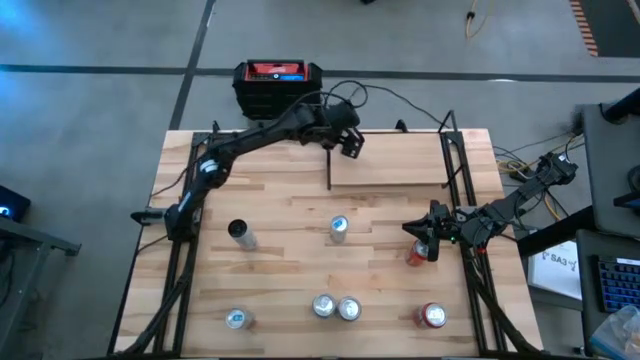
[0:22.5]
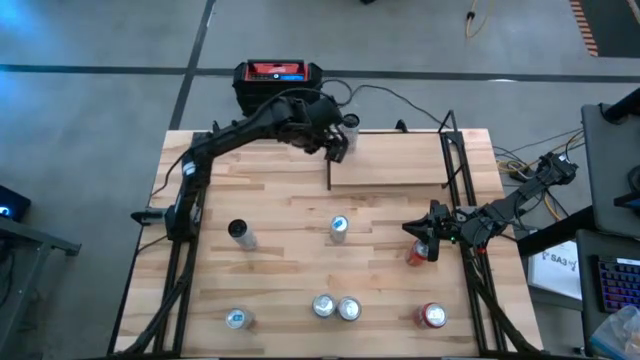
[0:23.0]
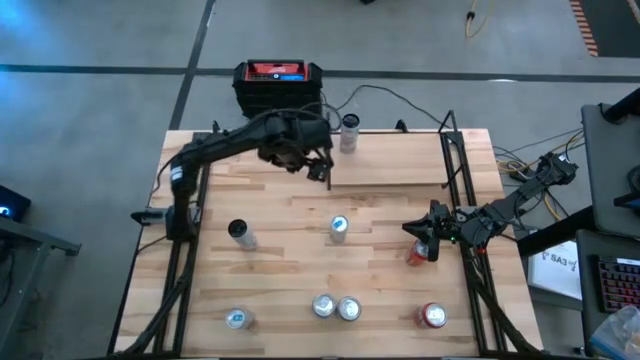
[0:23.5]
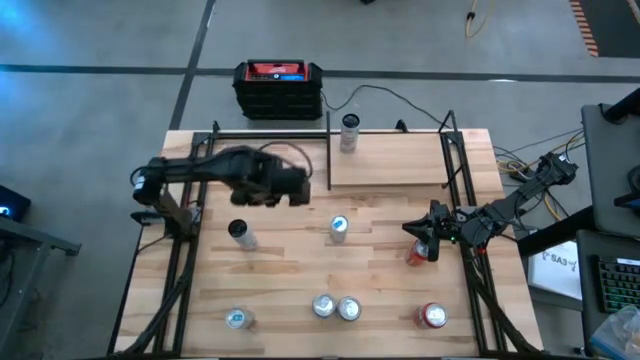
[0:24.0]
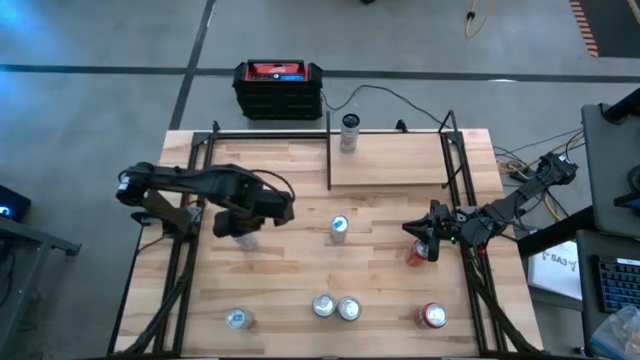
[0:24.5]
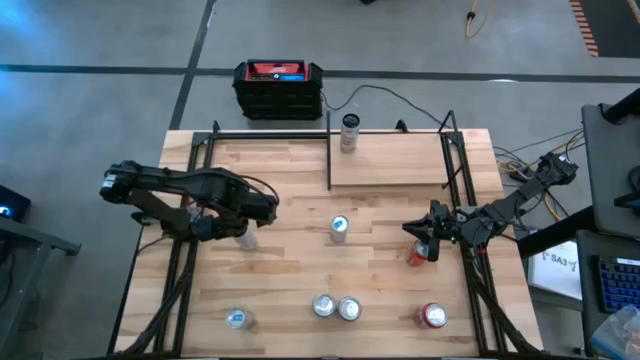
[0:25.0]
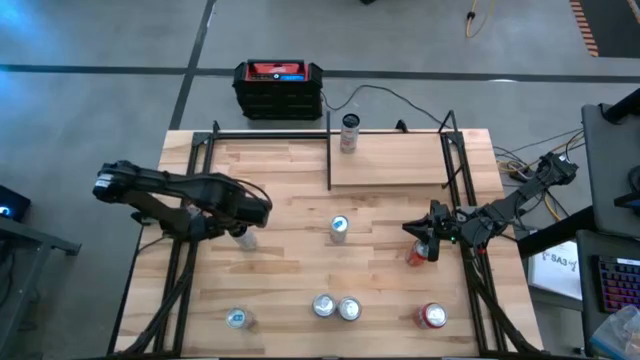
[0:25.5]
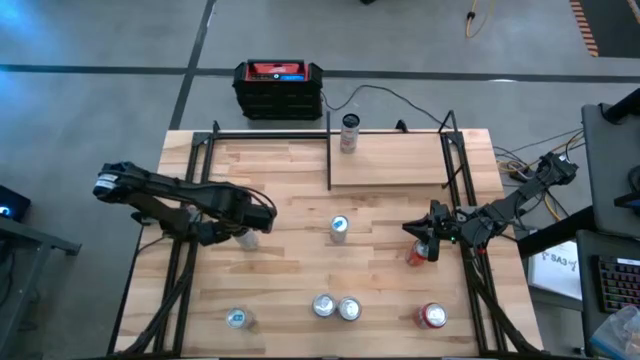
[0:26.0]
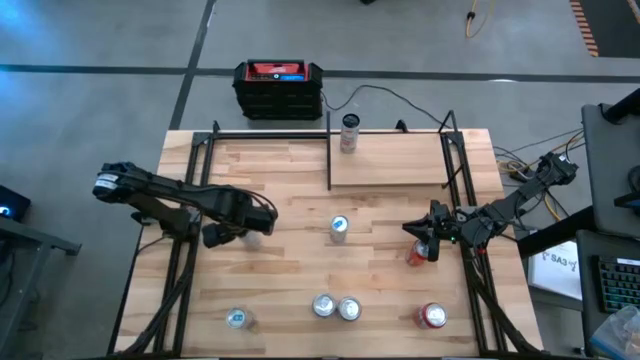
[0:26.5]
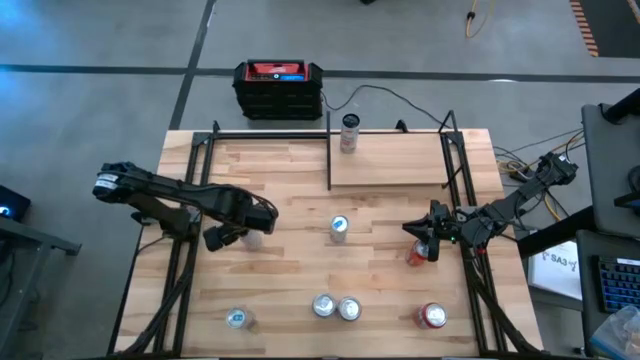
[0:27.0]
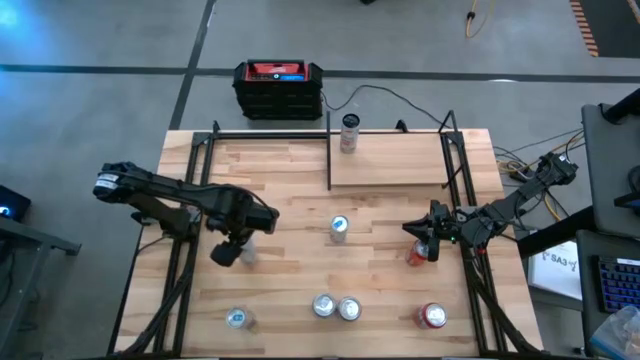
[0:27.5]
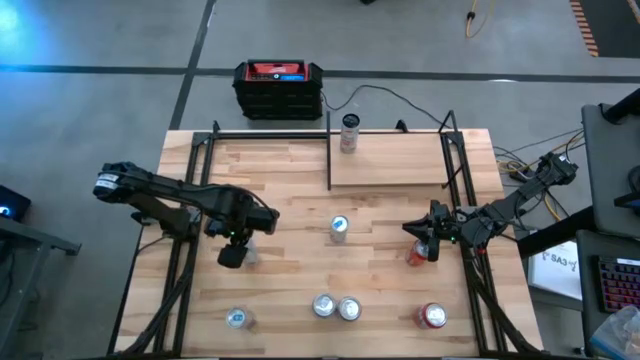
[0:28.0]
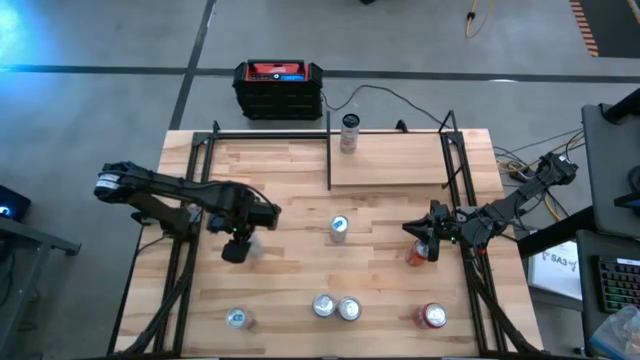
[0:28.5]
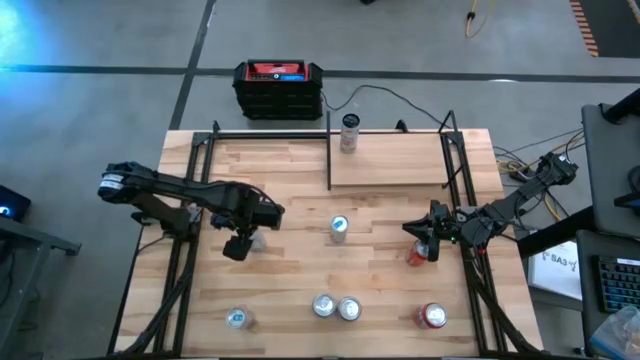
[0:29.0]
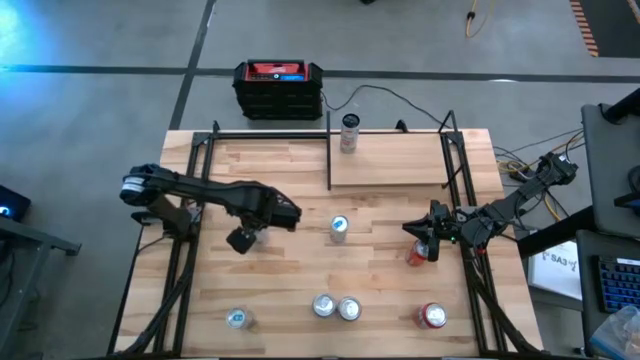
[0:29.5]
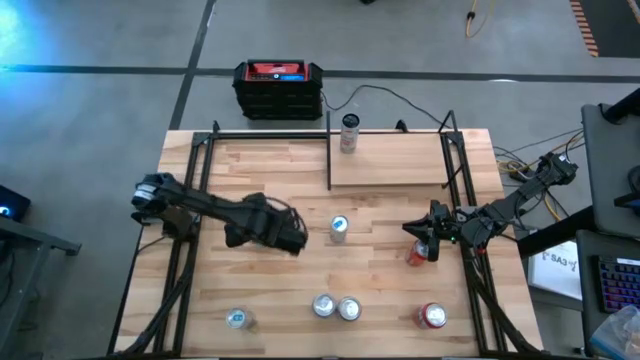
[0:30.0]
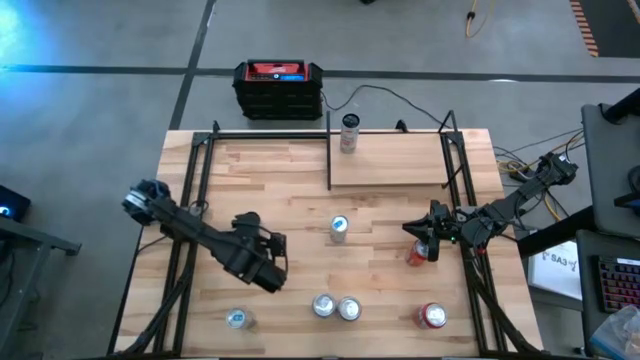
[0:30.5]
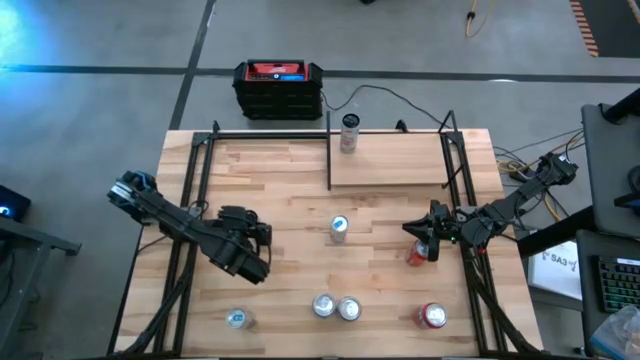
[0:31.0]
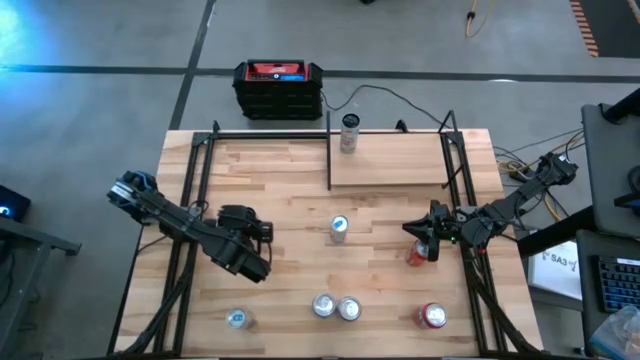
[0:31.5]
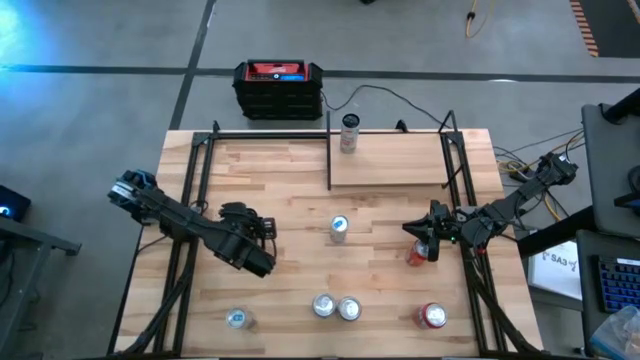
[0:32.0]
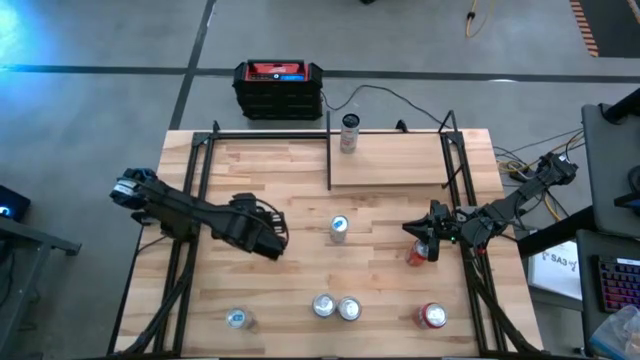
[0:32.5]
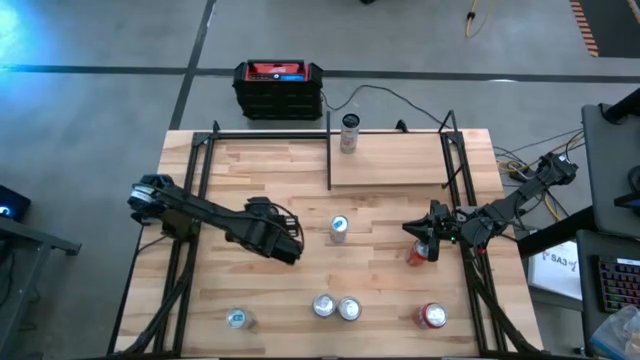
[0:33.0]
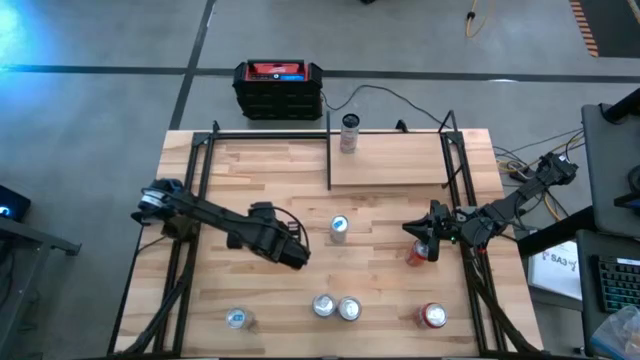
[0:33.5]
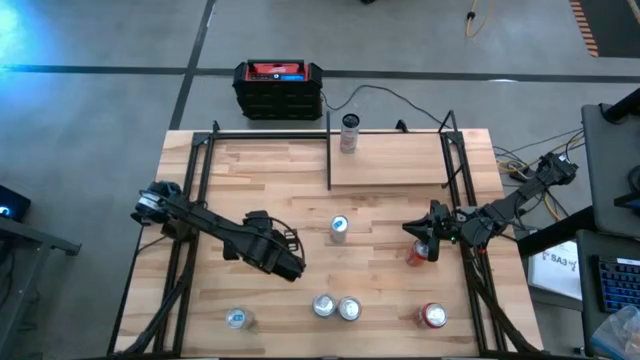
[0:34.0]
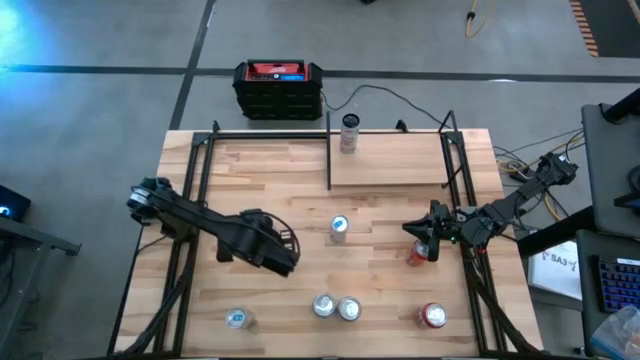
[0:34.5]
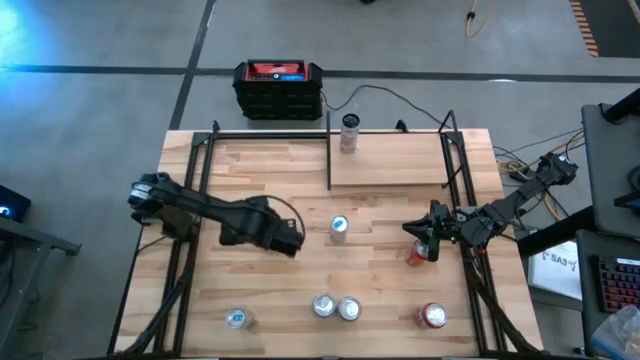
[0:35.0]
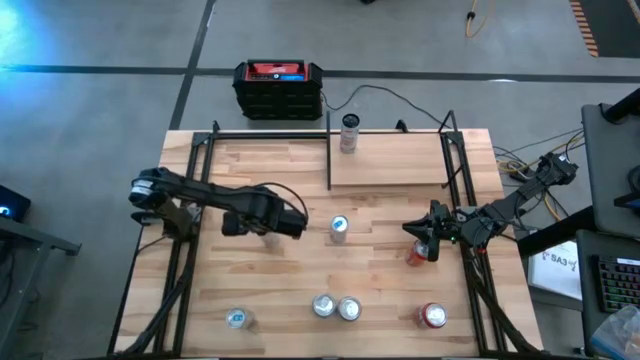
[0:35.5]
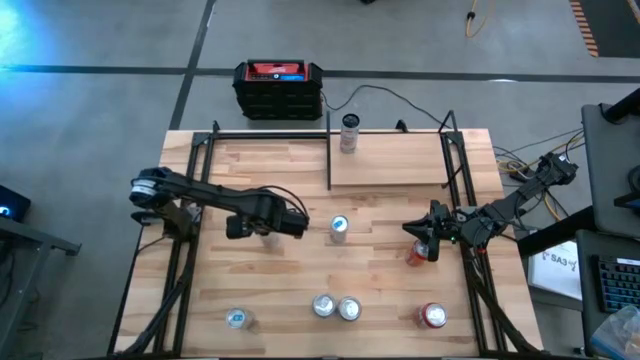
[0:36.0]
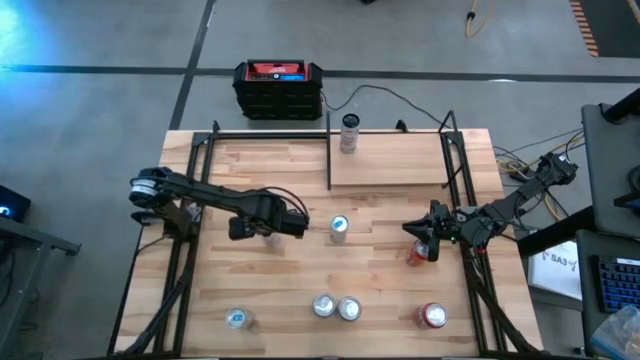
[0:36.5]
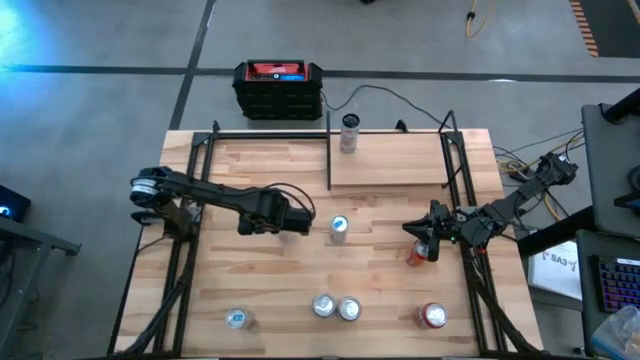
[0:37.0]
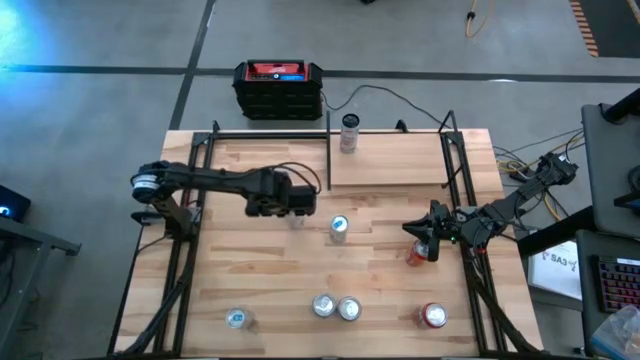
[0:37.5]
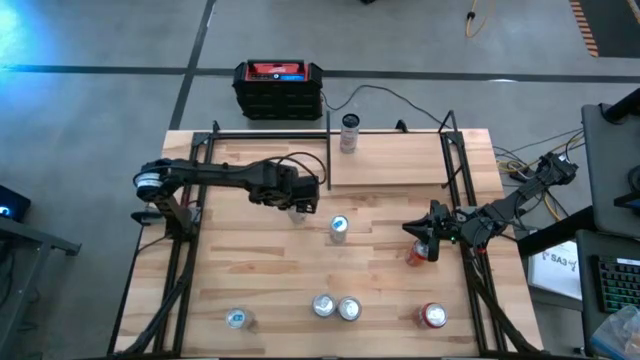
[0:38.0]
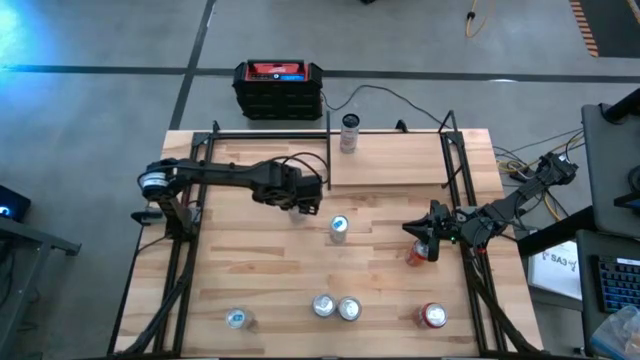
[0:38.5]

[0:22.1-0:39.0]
Task: Place canned beverage on shelf
Move the white pink soda to the center of the table

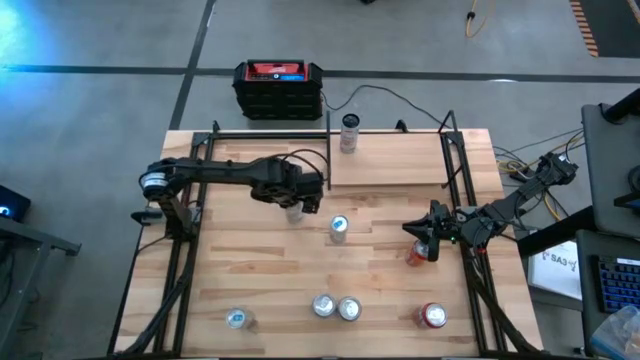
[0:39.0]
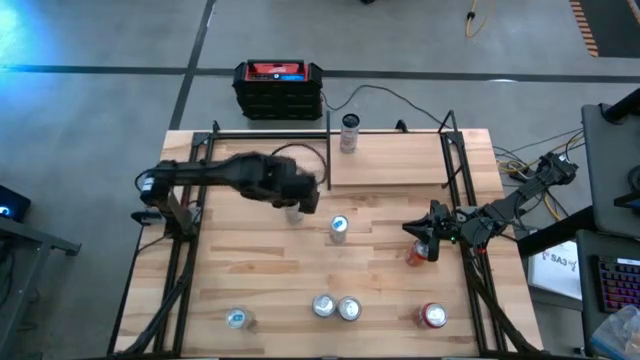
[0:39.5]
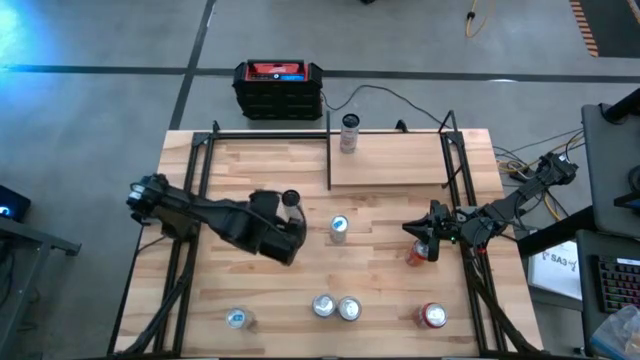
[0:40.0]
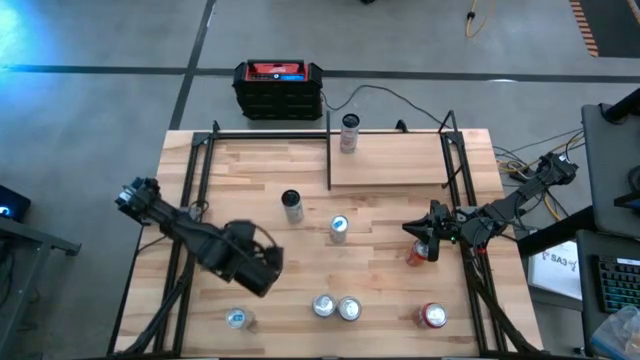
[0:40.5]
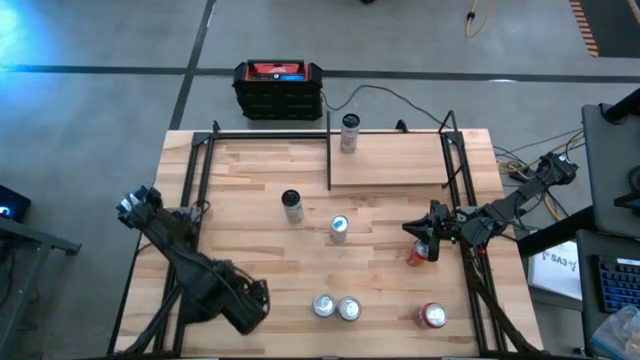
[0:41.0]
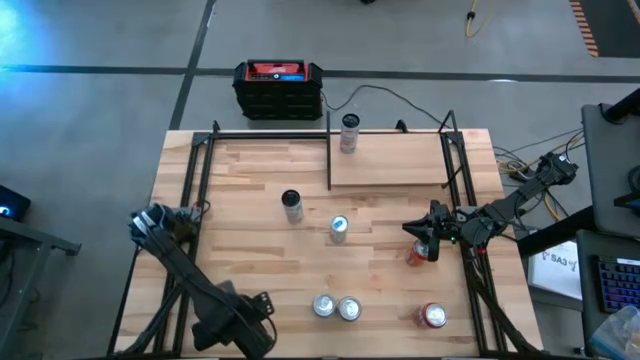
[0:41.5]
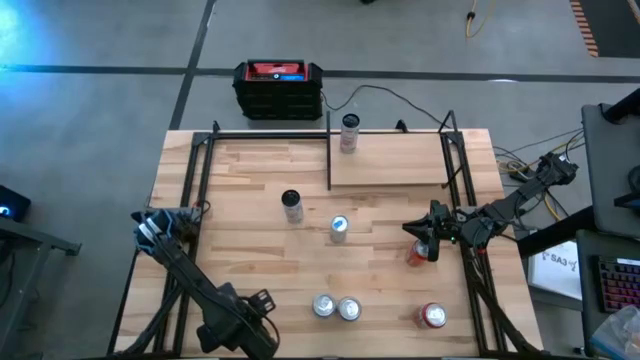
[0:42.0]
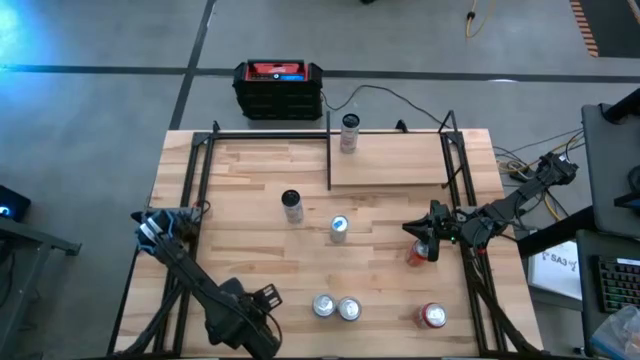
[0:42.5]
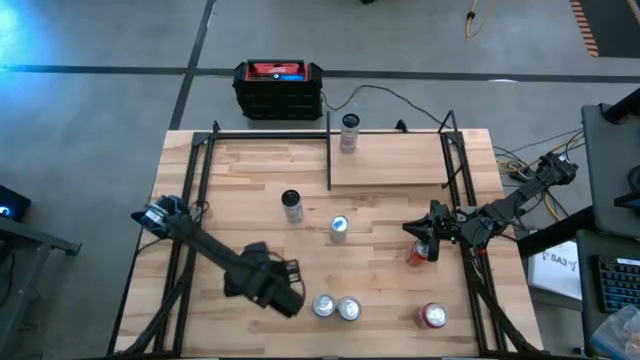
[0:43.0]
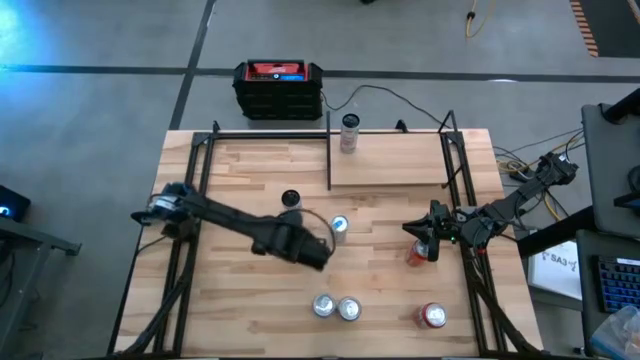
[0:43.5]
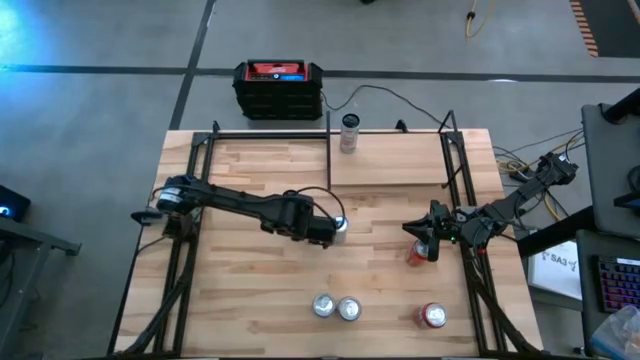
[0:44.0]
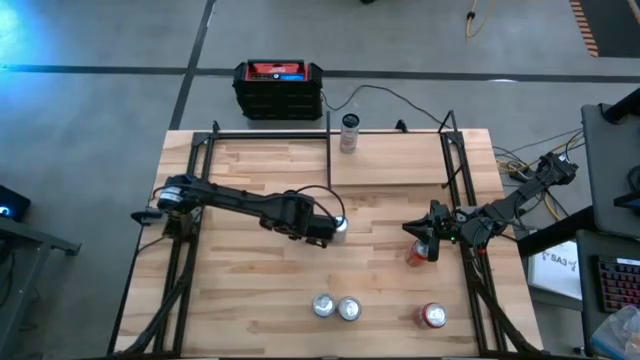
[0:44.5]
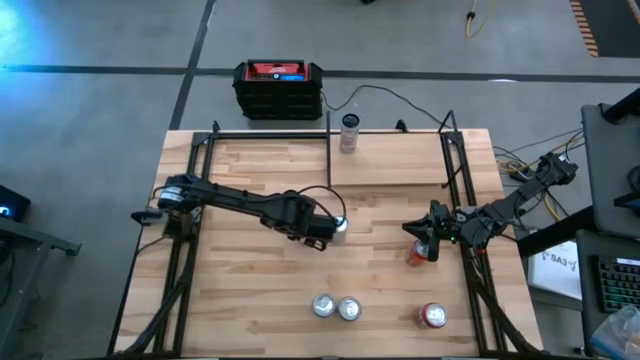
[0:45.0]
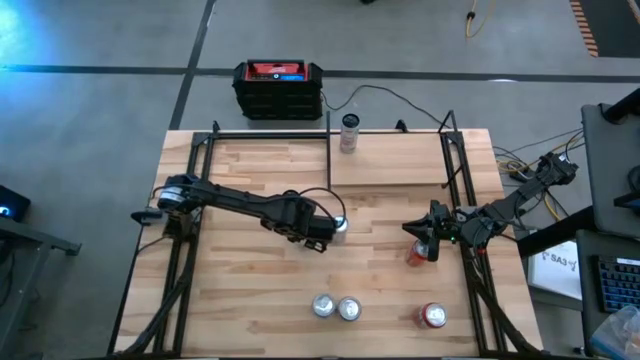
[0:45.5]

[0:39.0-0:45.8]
Move the bottom left blue soda can to the center of the table
